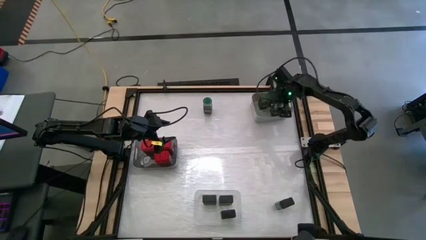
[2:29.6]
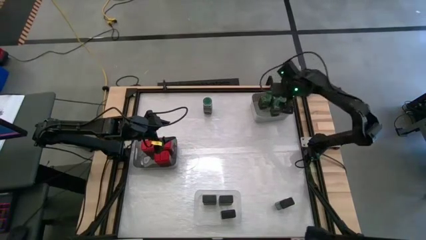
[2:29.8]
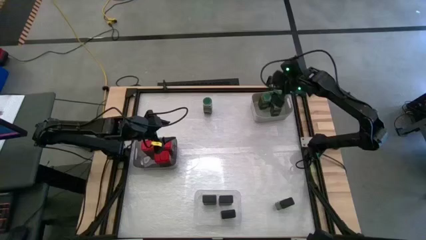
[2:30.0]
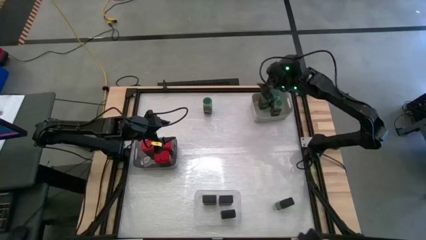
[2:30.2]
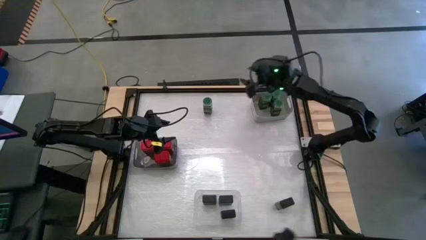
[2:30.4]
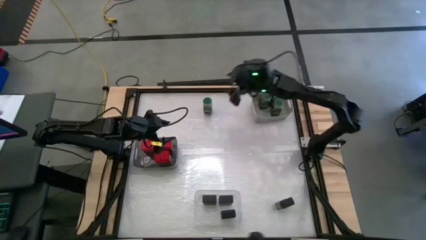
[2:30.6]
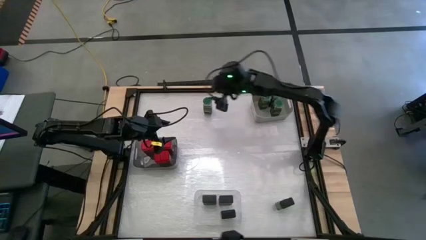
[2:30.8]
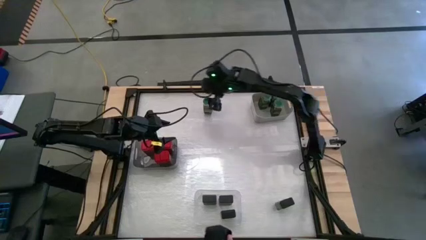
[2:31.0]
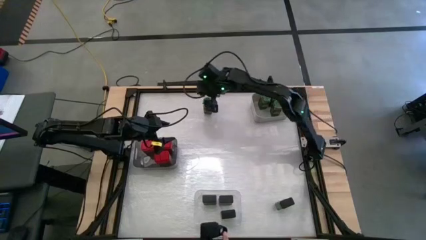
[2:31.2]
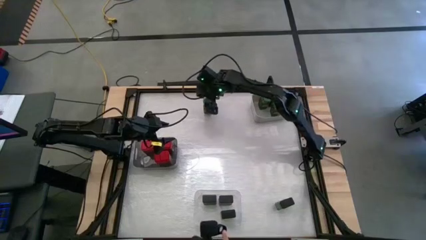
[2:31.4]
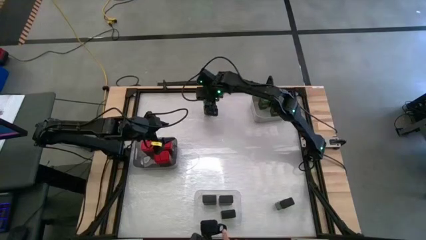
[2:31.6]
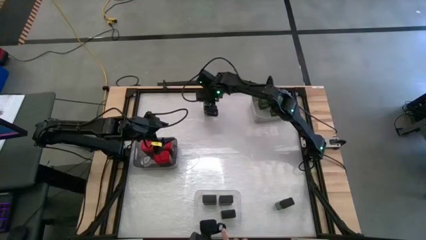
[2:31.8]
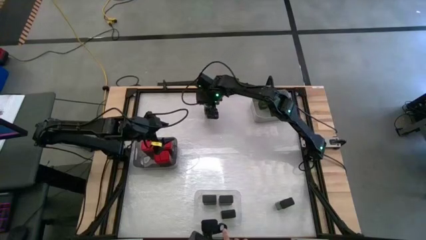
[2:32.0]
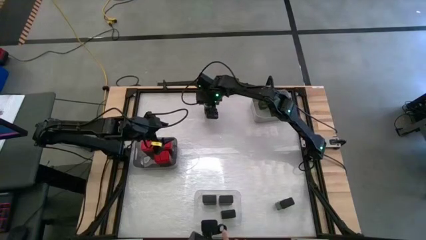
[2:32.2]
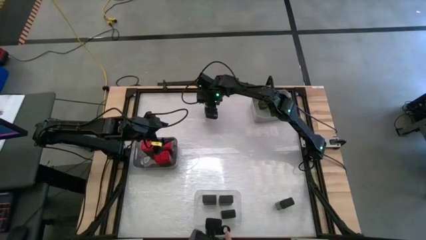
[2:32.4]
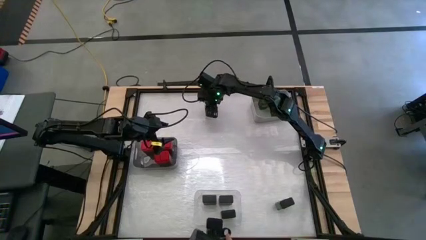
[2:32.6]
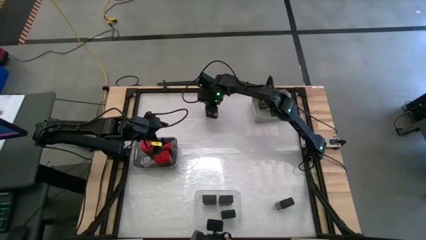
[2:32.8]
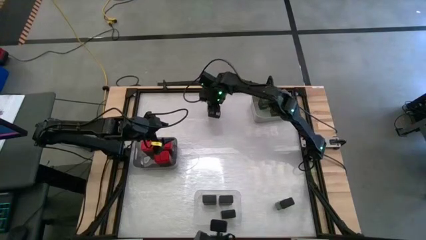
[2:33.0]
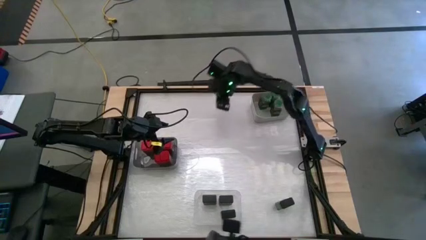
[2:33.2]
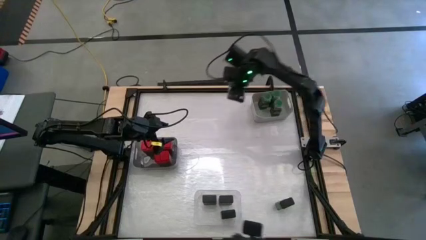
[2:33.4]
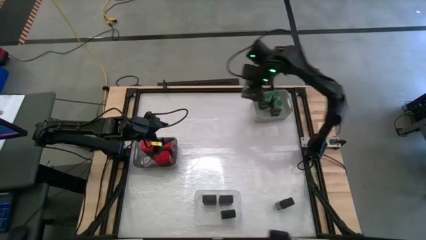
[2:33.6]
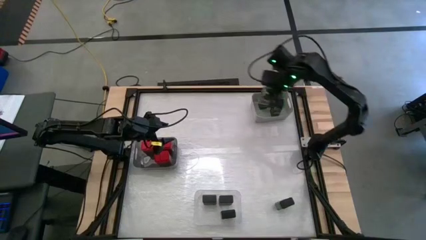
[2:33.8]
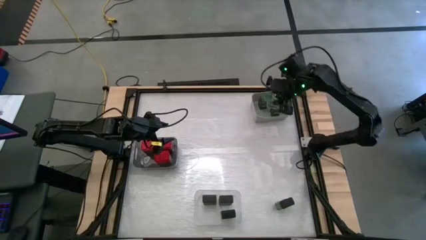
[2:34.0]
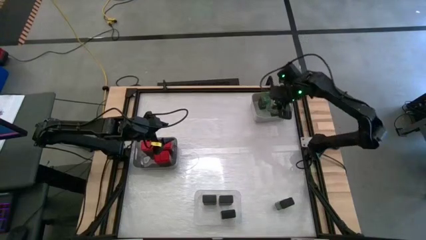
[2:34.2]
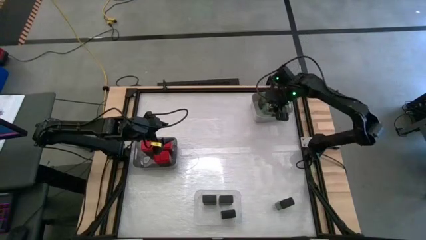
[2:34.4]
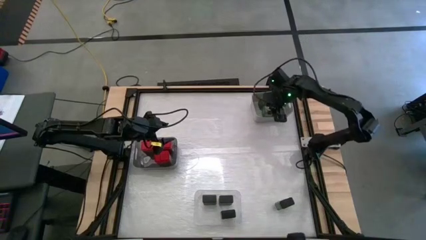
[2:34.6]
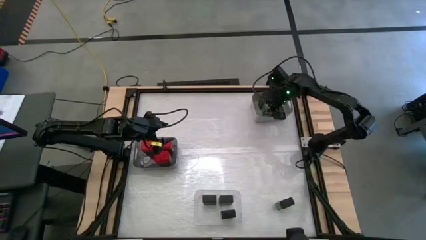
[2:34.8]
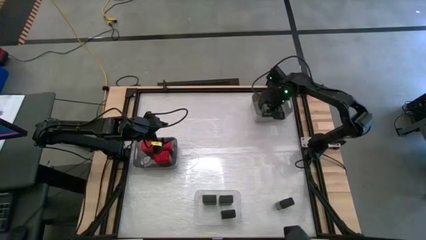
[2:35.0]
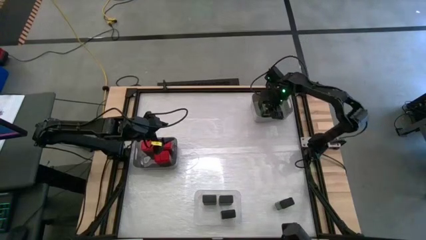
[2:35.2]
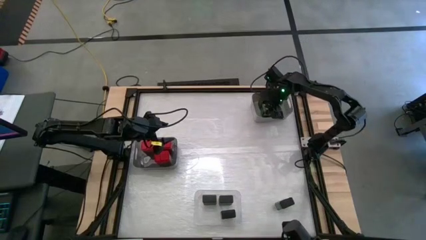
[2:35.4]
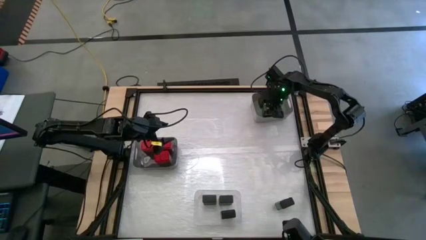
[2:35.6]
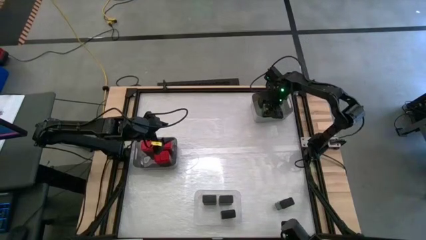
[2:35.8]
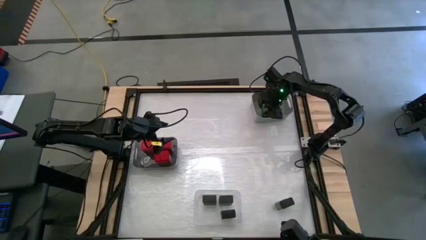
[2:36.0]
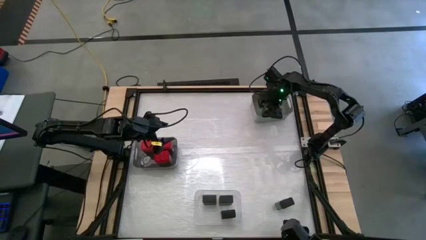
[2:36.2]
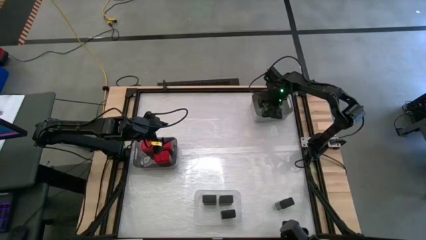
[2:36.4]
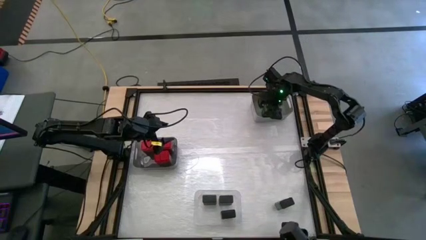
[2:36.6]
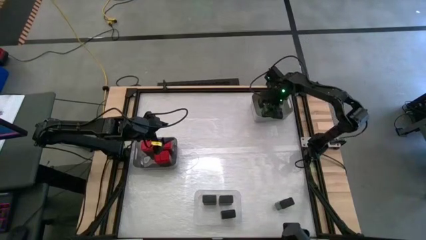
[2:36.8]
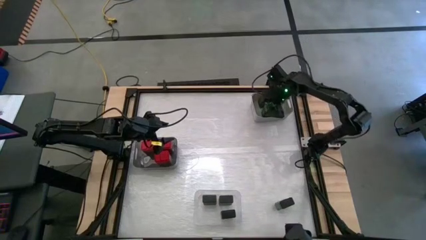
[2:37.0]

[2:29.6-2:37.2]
Task: Sort spices by type
Put the green seasoning bottle into the grey bin

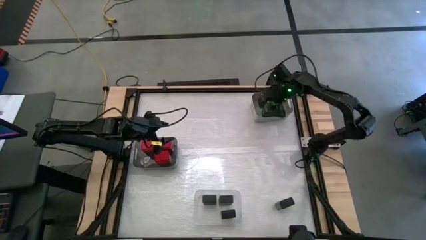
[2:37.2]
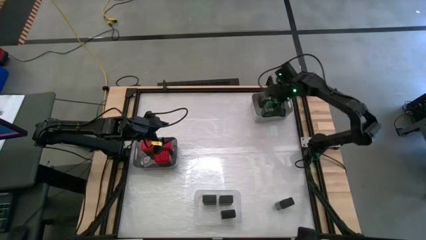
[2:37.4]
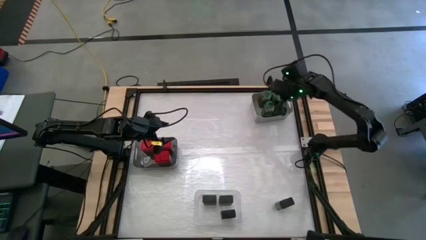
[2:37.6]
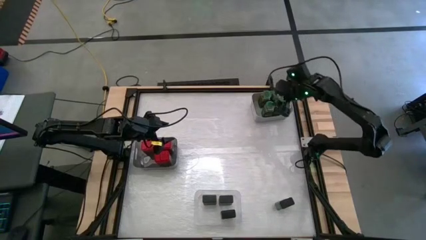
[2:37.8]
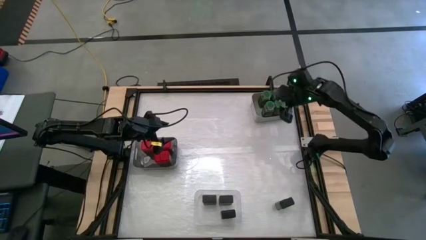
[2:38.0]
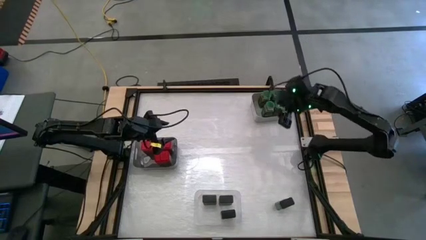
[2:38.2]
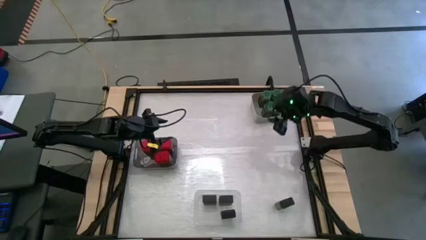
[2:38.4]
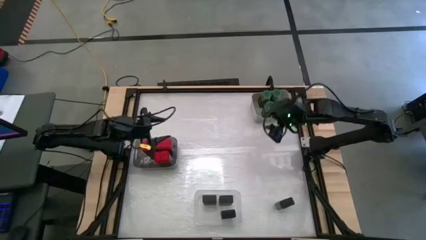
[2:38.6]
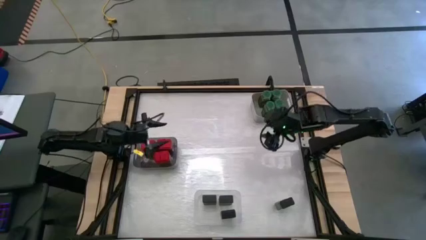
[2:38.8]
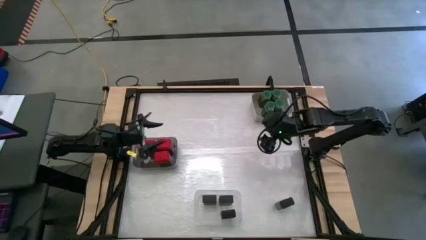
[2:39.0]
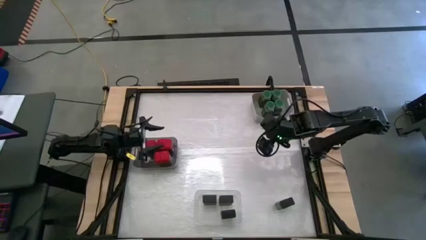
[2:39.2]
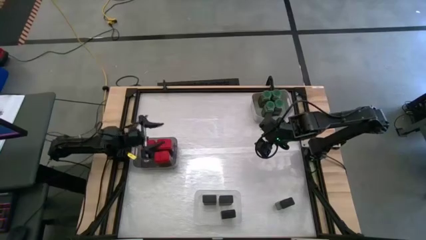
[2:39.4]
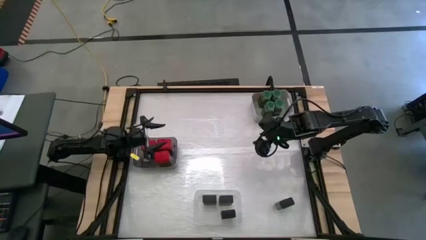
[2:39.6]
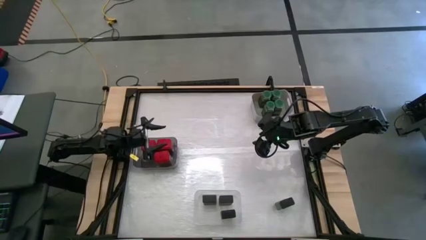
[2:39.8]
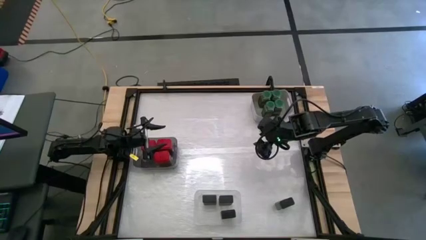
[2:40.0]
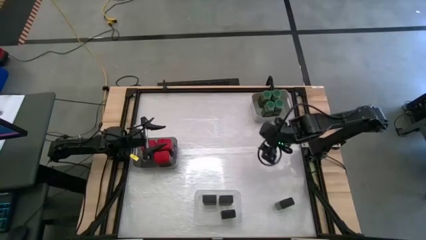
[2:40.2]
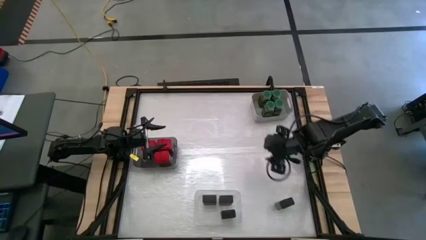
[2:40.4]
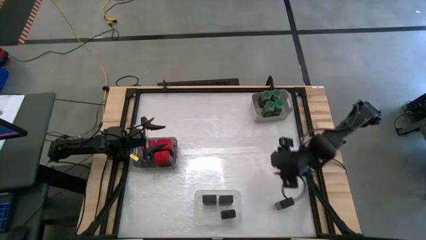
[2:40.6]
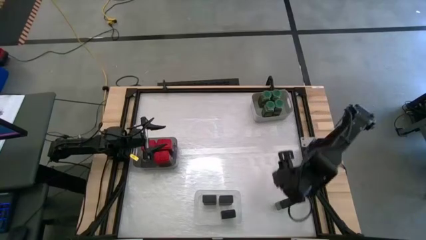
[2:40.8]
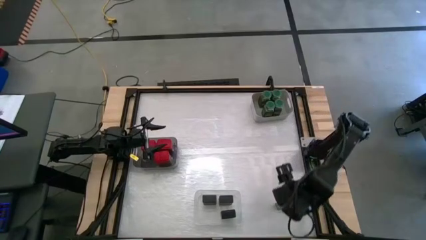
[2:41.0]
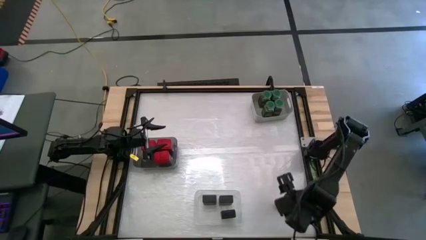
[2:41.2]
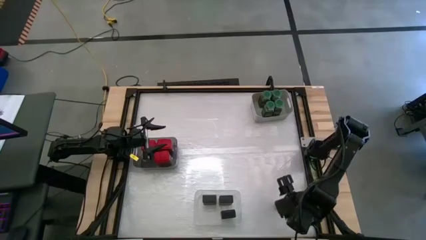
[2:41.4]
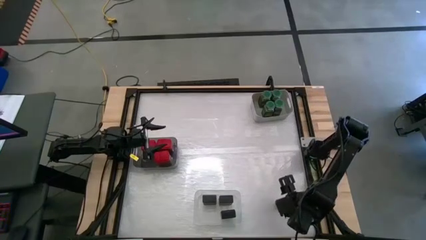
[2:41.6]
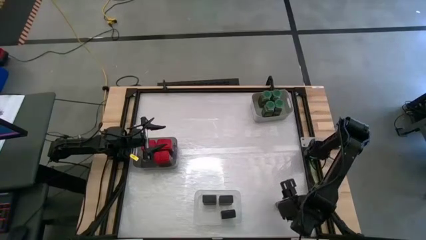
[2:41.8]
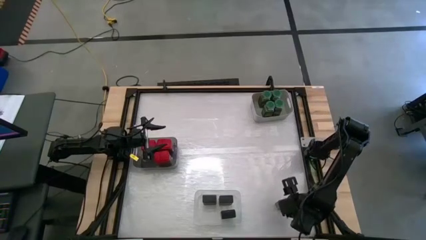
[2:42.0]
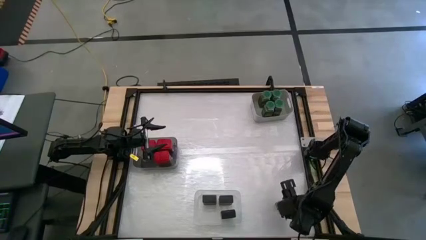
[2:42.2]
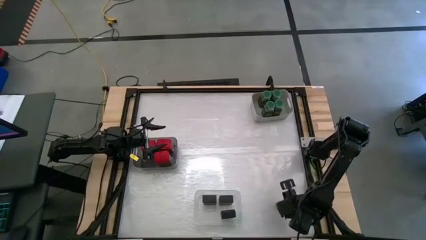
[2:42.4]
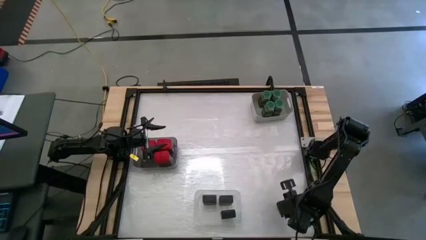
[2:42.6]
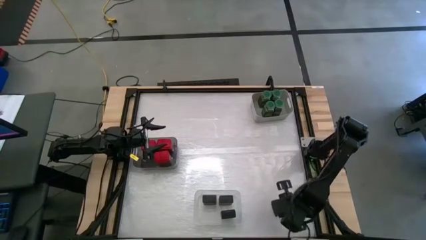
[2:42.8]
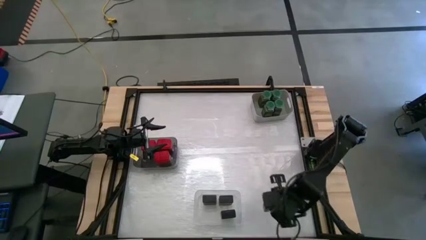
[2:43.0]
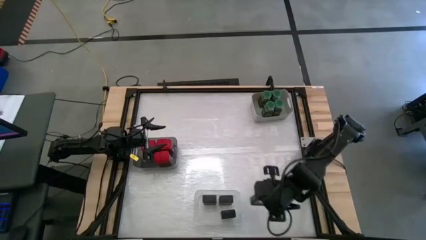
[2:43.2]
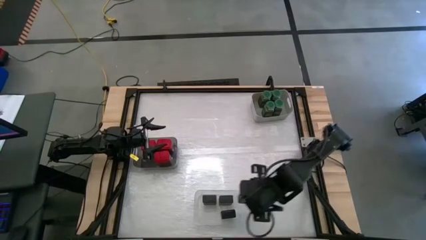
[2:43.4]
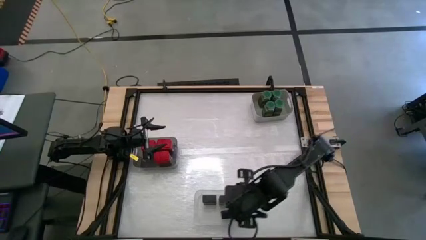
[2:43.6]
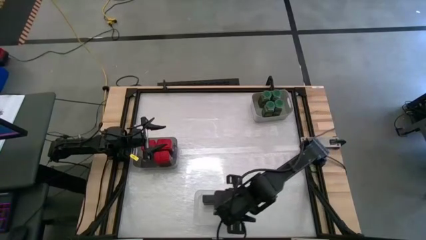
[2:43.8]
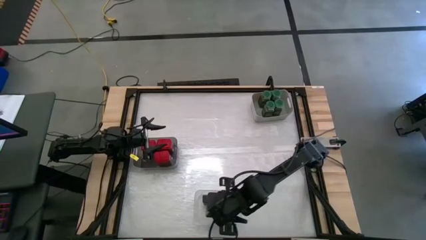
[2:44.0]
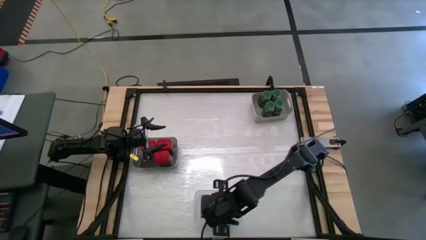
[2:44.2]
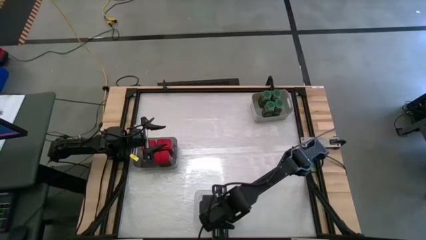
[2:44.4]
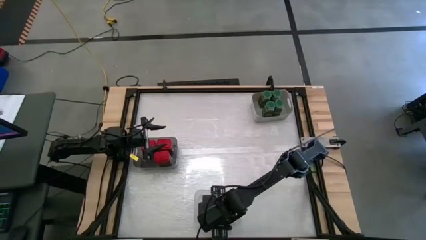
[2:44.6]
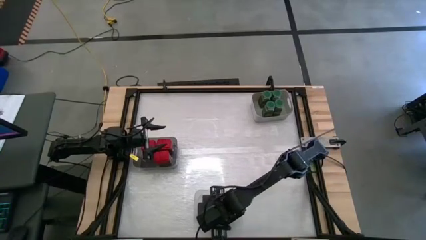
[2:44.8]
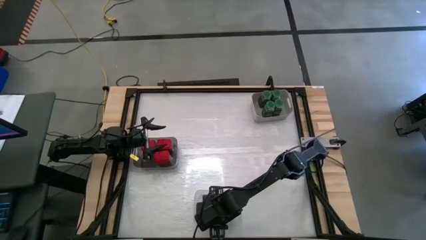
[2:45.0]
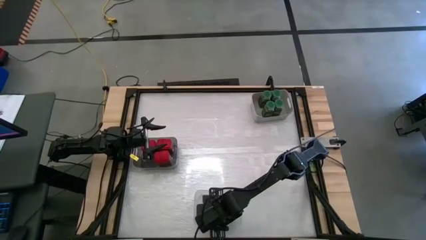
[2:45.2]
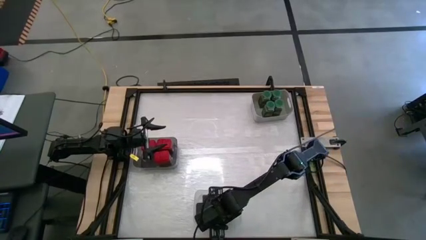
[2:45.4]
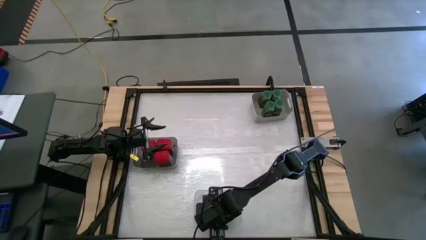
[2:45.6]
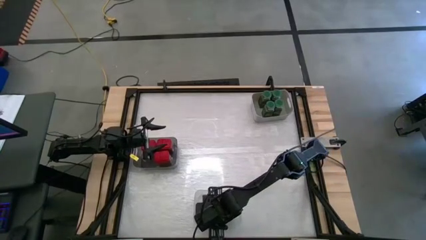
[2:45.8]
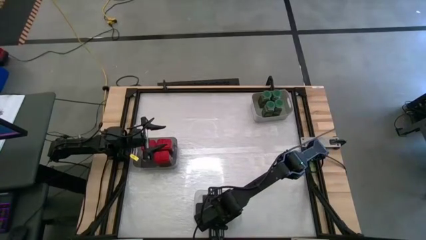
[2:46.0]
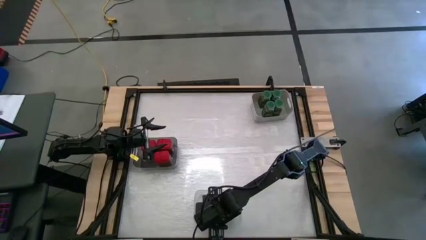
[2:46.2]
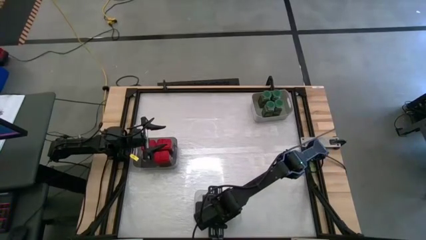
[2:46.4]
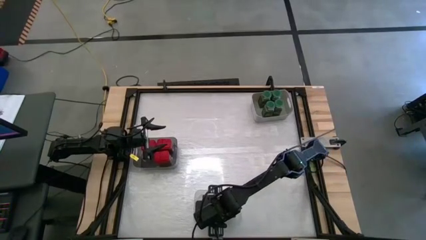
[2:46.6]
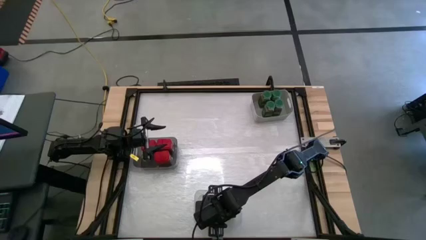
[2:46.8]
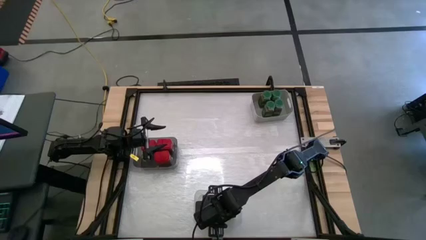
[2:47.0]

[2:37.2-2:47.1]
Put the black seasoning can into the transparent bin
